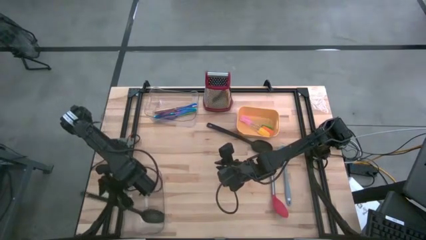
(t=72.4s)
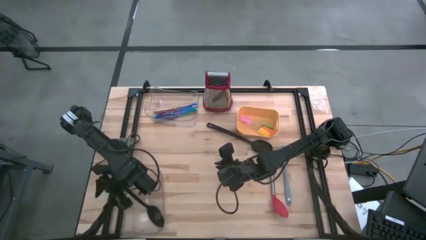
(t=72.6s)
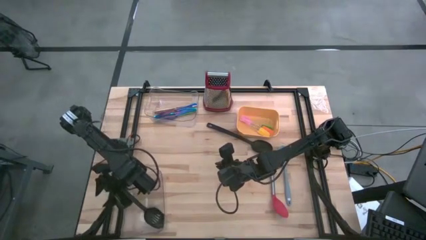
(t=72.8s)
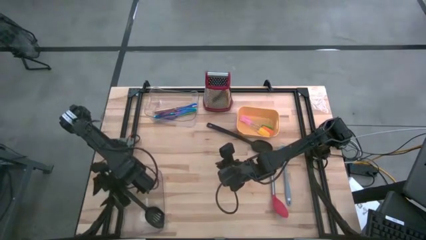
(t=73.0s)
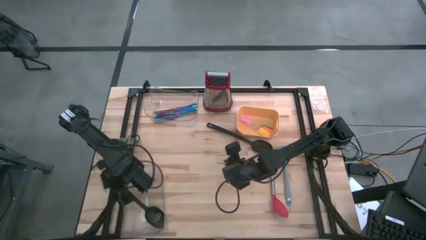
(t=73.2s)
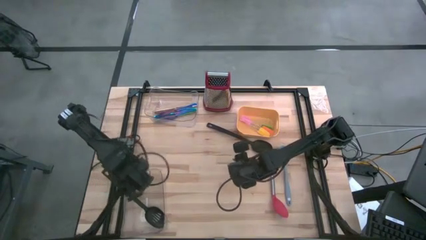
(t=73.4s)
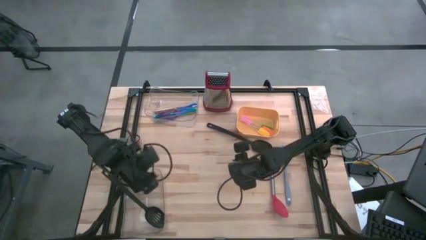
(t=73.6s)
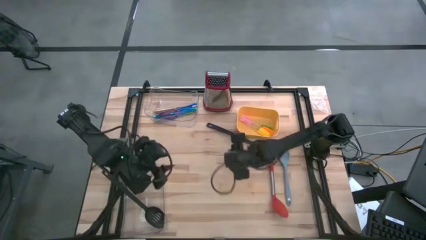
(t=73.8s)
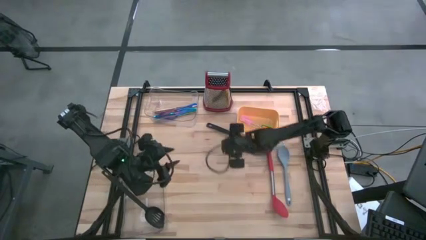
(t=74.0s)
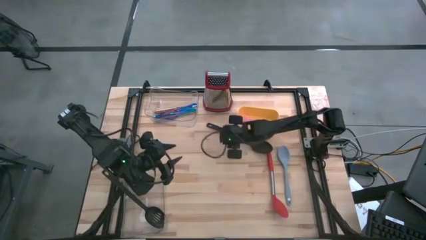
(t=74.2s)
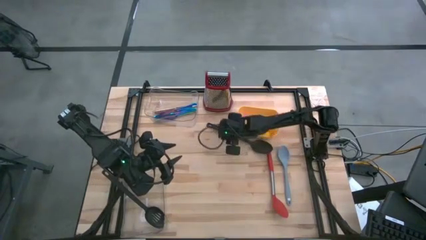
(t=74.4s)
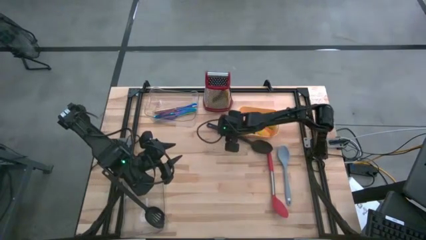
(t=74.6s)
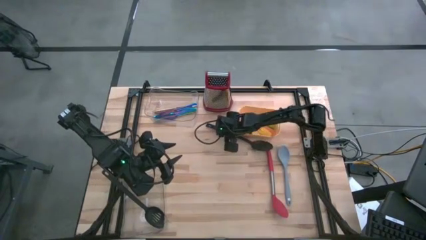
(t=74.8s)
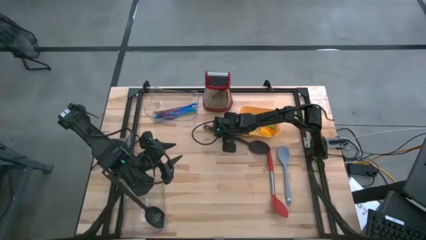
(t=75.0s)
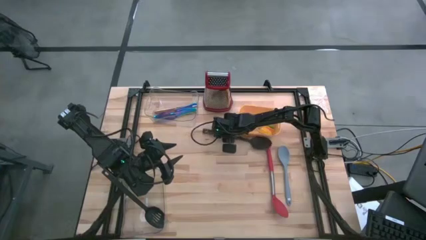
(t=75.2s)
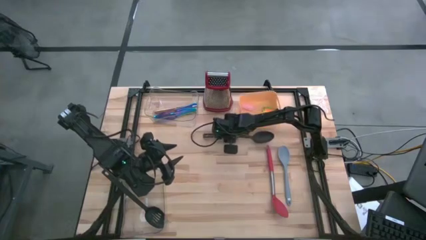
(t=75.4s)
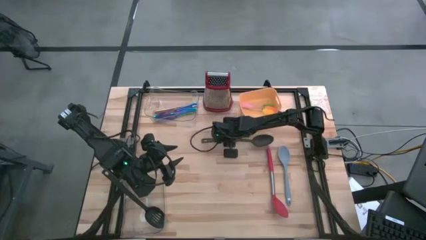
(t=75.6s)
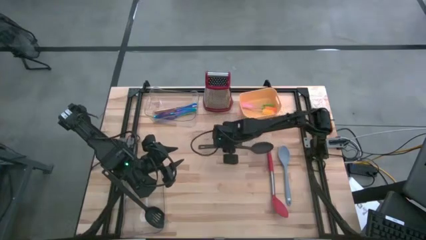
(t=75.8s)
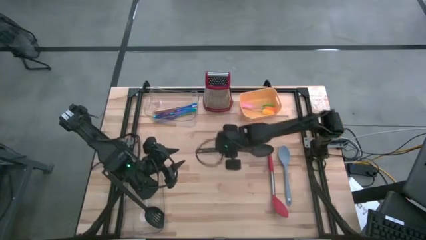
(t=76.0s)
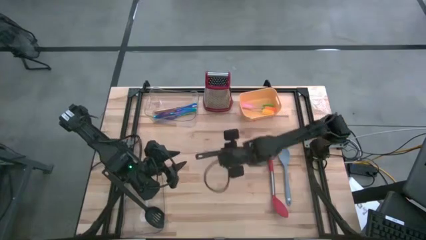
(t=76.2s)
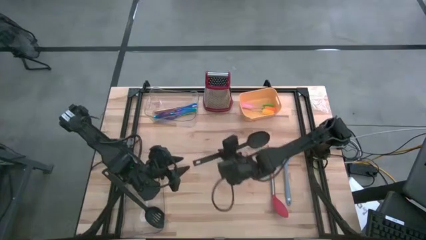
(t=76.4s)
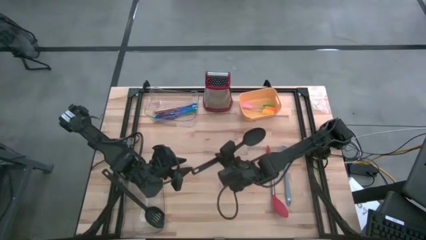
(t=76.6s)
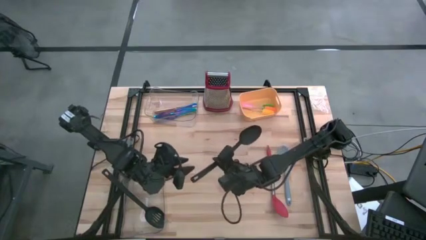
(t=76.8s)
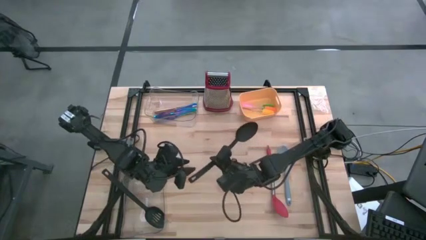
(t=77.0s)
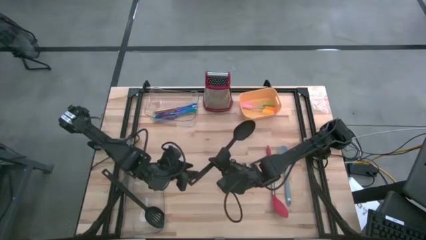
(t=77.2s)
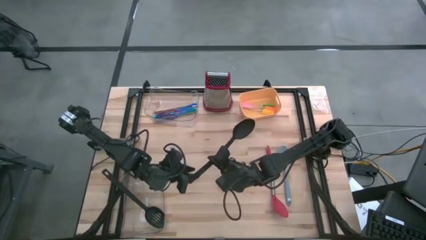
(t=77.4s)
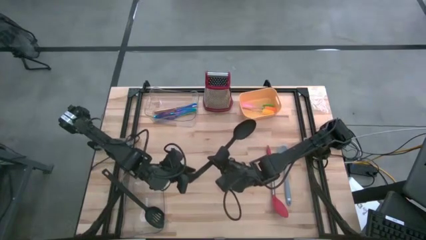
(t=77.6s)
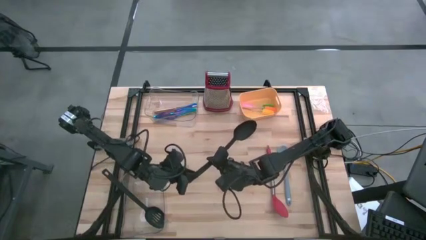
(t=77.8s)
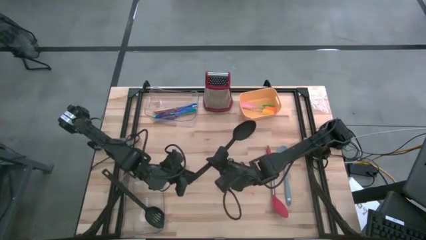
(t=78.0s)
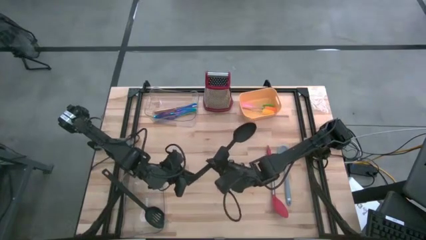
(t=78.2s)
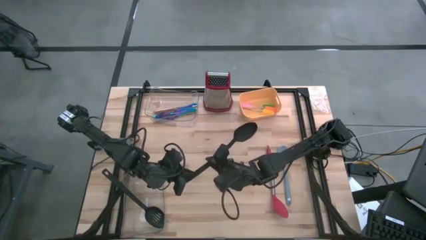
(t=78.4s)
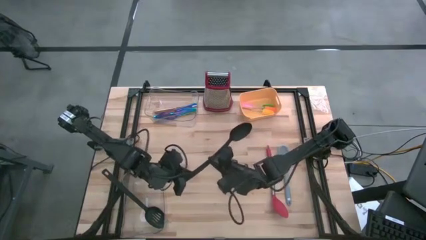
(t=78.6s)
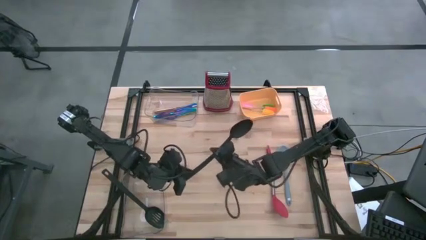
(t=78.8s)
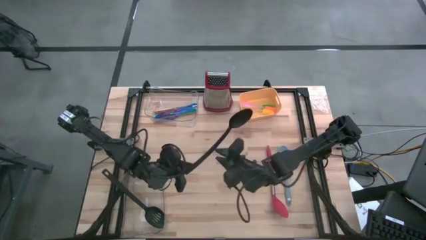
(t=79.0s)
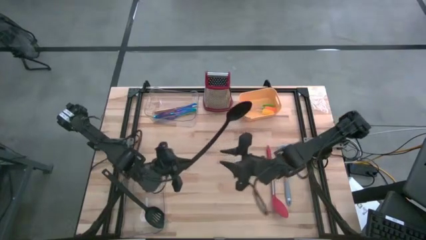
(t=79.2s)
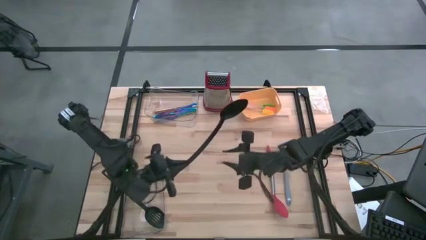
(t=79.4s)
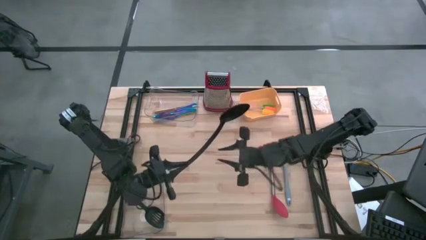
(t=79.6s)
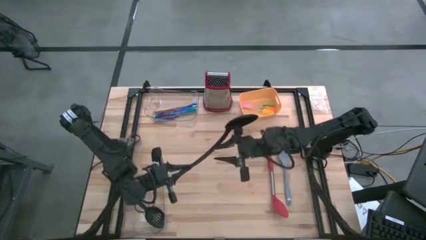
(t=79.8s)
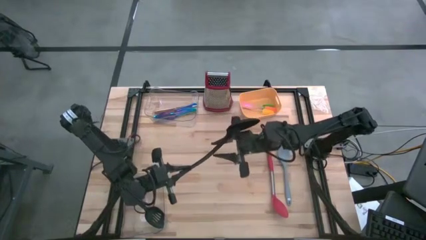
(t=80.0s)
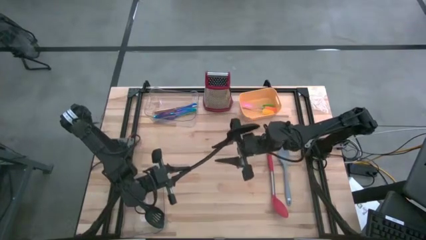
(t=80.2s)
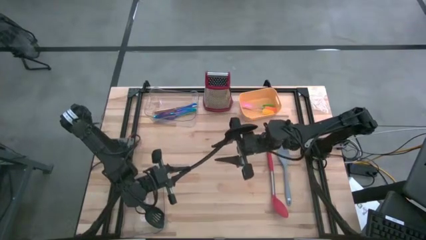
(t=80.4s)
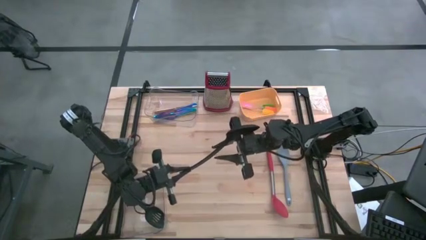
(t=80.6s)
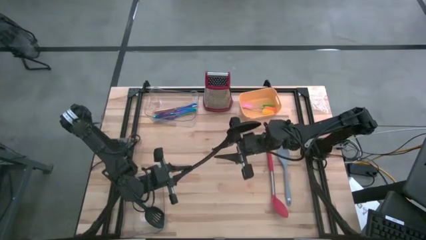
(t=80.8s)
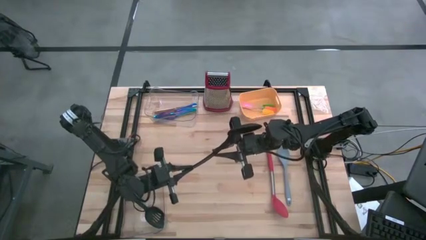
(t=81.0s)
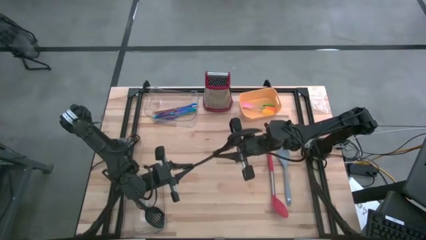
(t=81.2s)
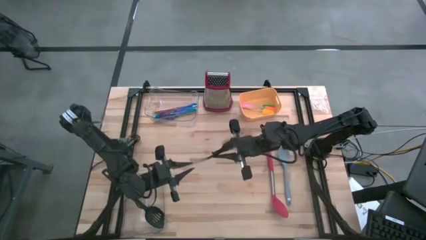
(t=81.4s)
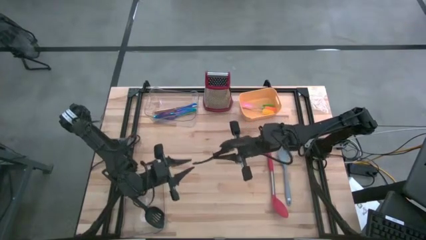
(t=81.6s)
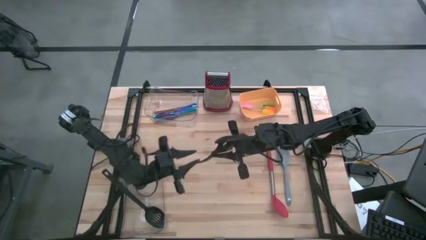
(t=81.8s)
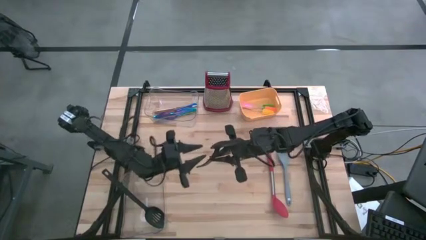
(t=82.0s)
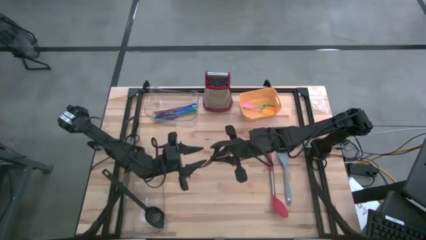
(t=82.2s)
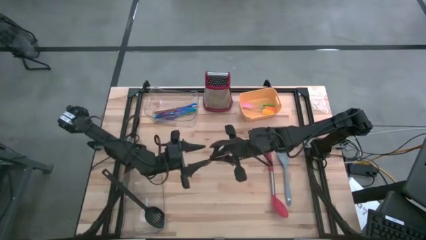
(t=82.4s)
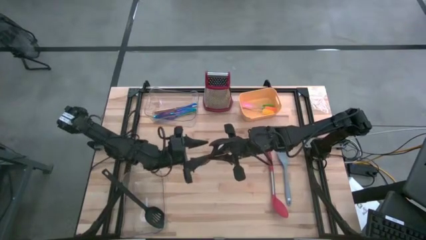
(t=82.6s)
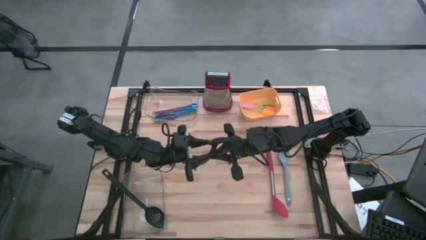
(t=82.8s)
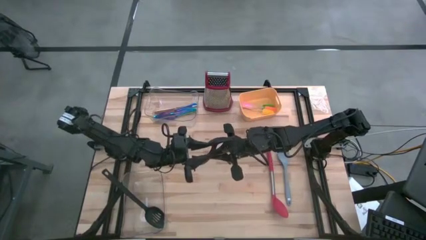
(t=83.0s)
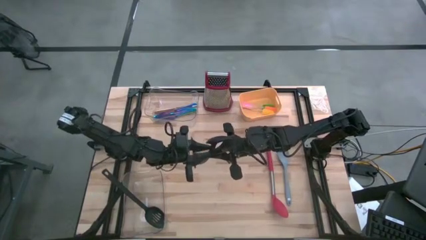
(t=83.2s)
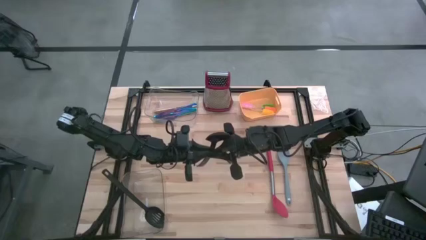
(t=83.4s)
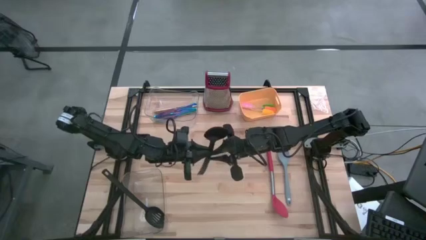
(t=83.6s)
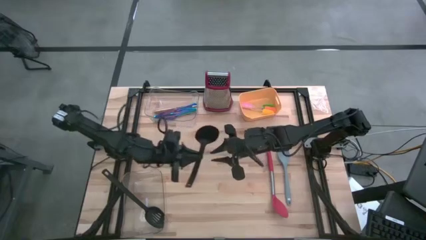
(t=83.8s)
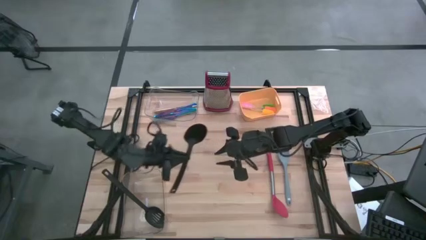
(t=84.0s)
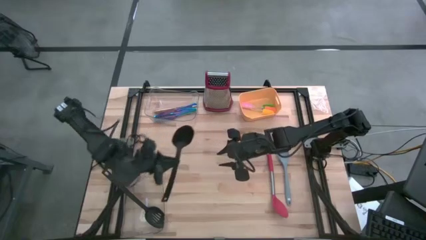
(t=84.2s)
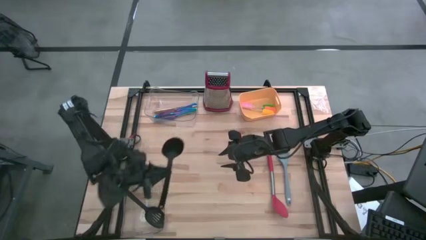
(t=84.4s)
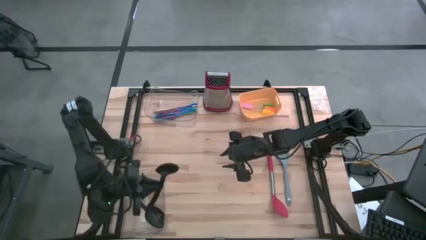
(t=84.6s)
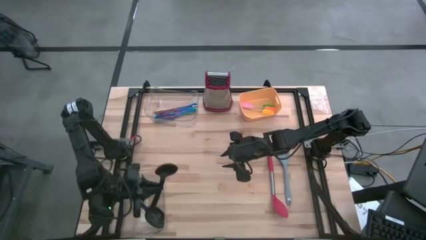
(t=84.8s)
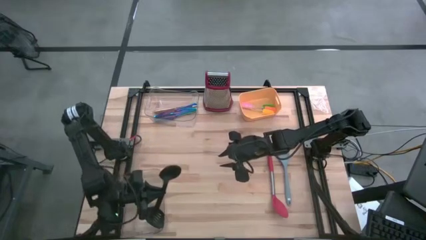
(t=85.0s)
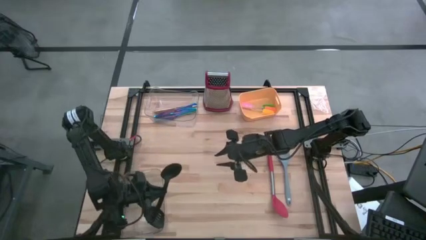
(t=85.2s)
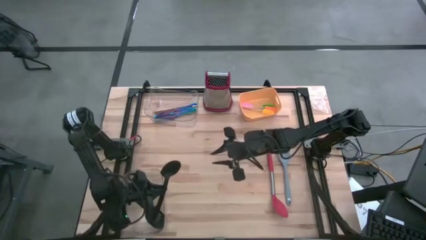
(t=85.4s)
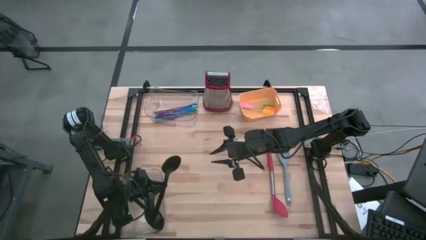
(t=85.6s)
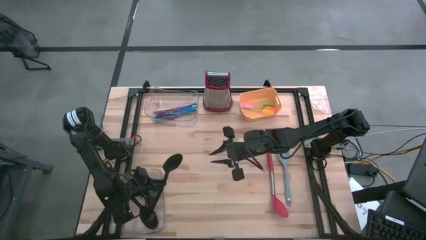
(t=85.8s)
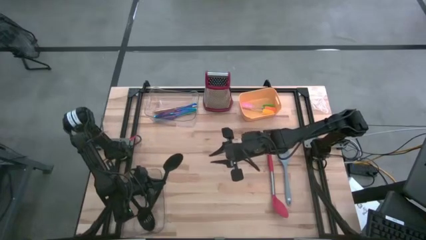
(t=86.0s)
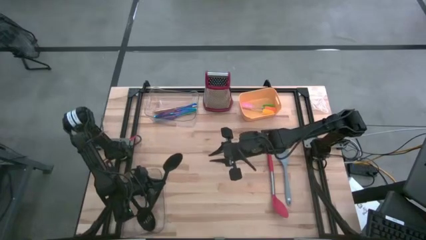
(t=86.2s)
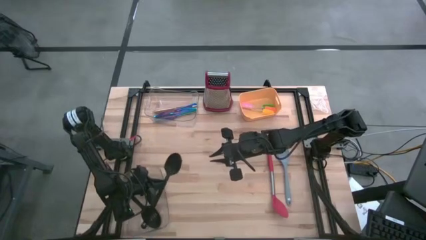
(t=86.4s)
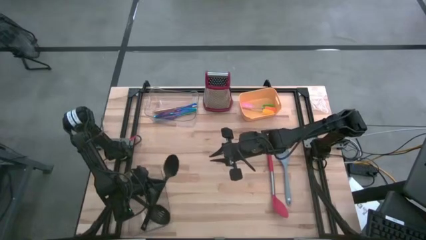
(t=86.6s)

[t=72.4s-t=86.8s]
Task: Pick & Place Kitchen Items
Put the black serving spoon into the bottom transparent bin

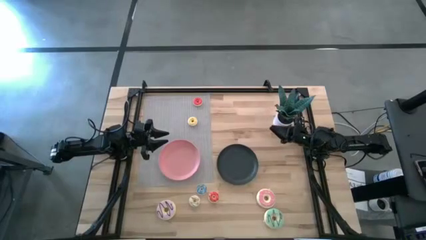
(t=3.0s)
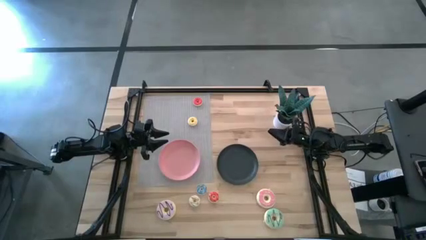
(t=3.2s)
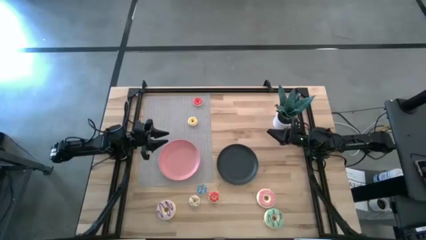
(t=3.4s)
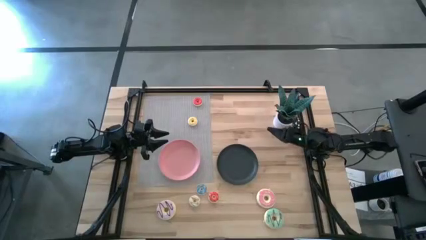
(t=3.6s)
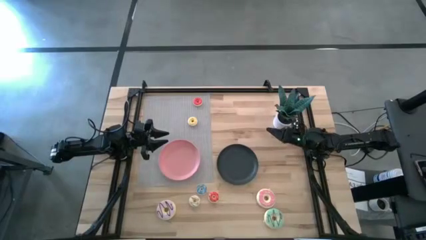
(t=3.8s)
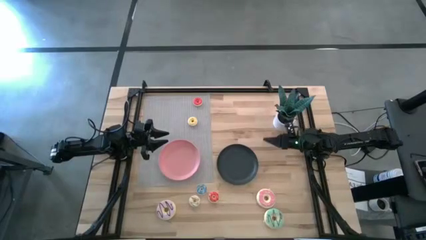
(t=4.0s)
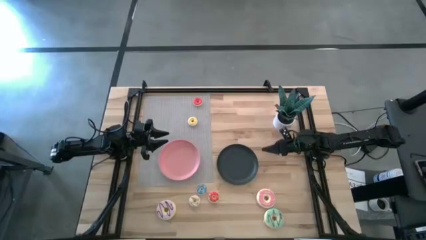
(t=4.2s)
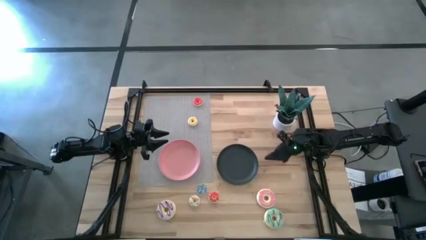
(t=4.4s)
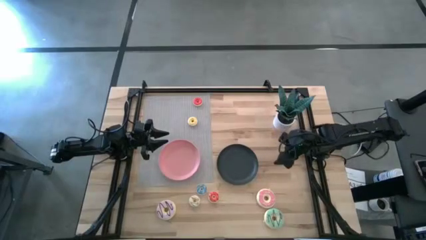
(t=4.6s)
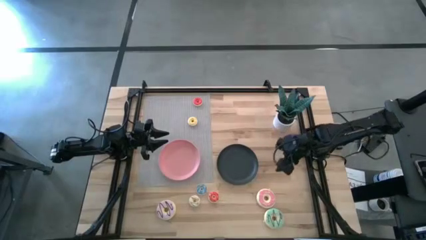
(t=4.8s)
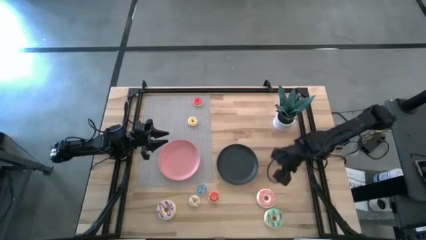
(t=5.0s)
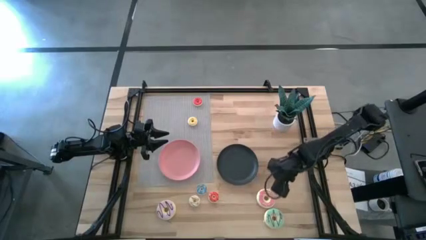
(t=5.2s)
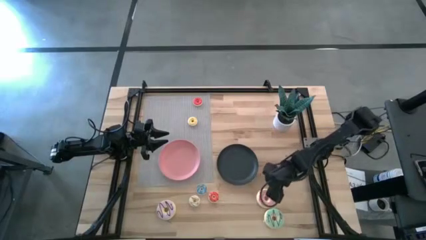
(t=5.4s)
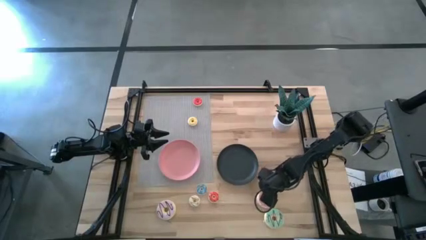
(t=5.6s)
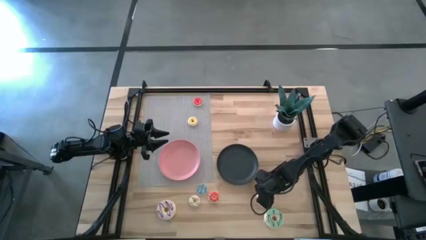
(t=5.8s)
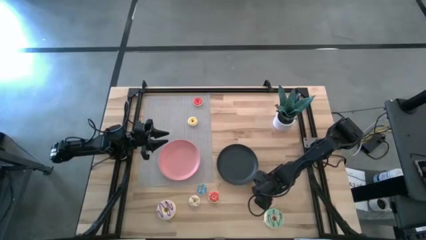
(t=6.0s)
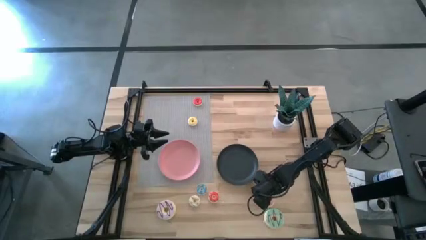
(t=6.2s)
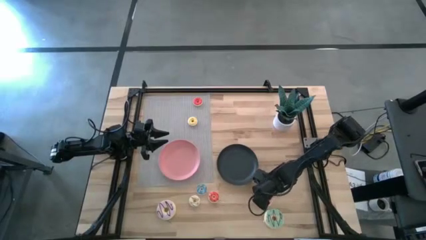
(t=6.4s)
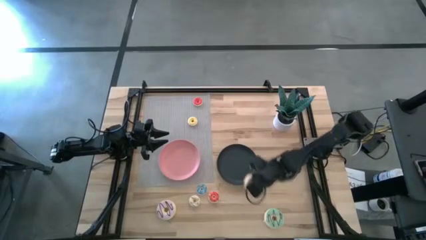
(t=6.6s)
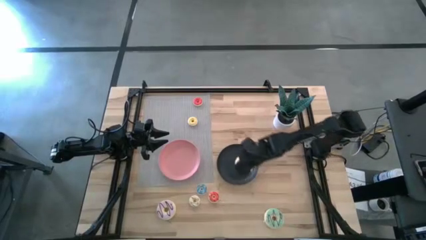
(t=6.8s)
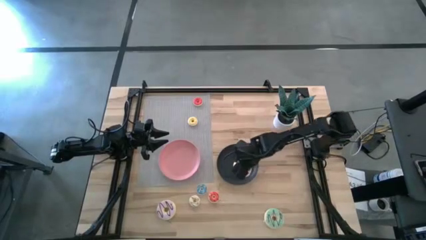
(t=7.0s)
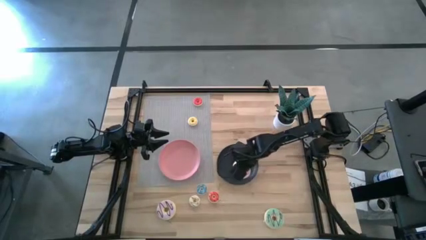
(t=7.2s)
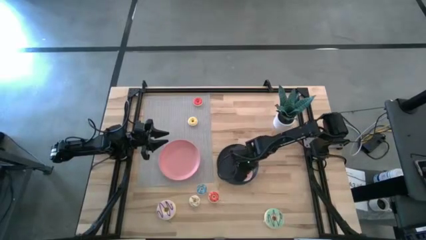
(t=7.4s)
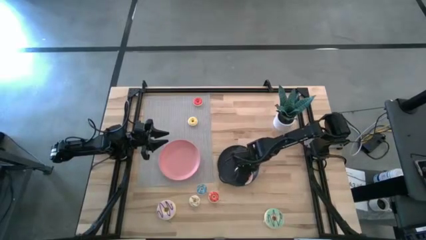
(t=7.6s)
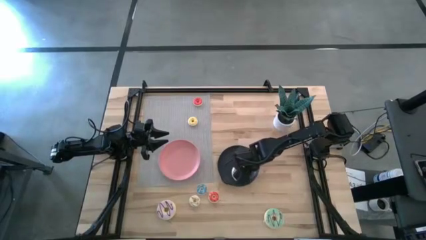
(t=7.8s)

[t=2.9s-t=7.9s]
Task: Pick & Place donuts
Put the small pink donut on the pink plate
